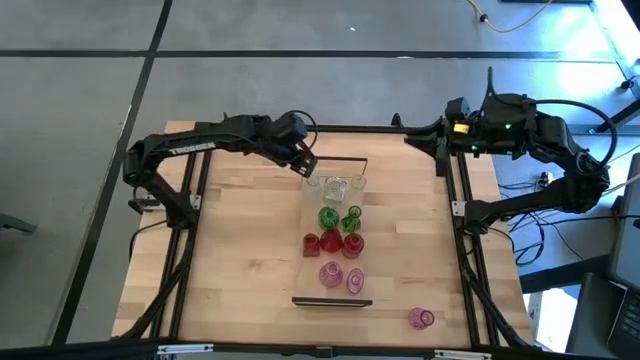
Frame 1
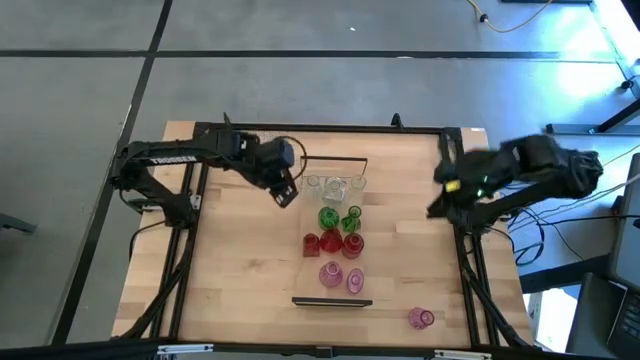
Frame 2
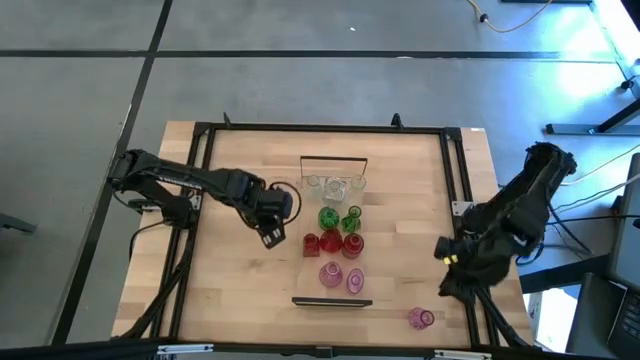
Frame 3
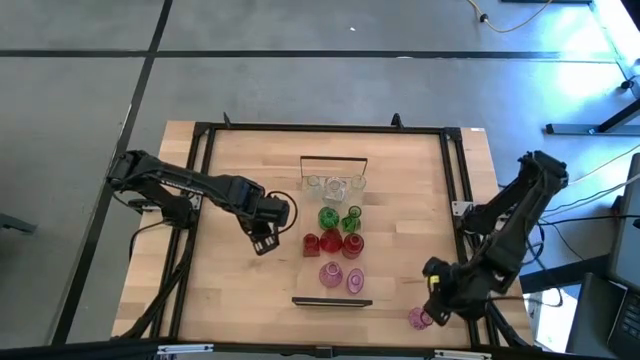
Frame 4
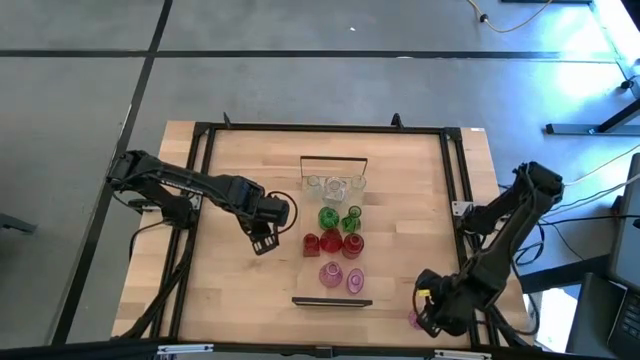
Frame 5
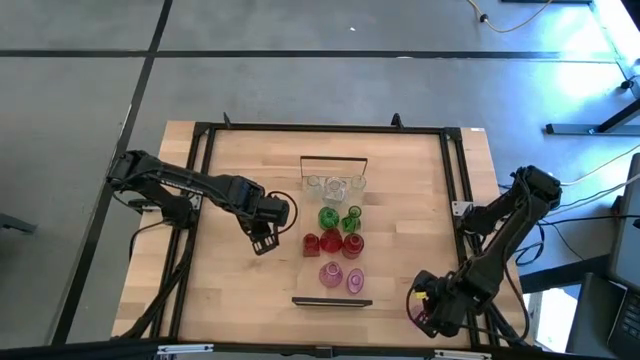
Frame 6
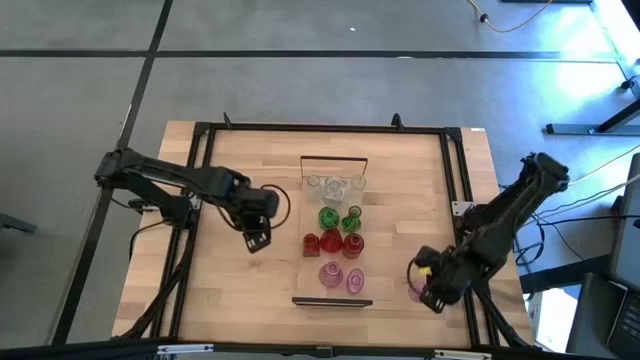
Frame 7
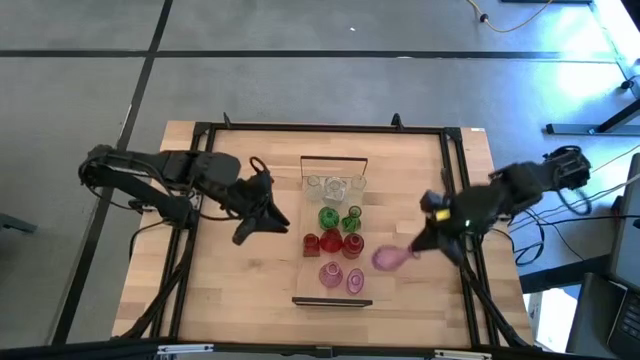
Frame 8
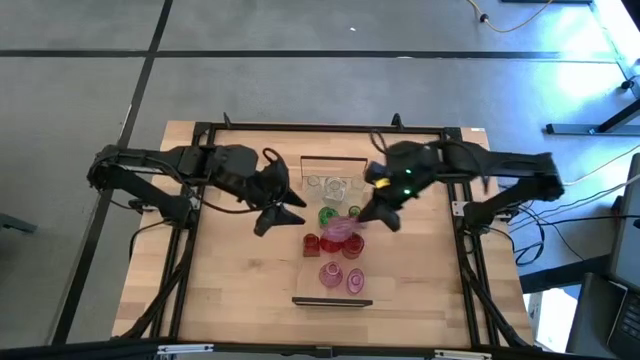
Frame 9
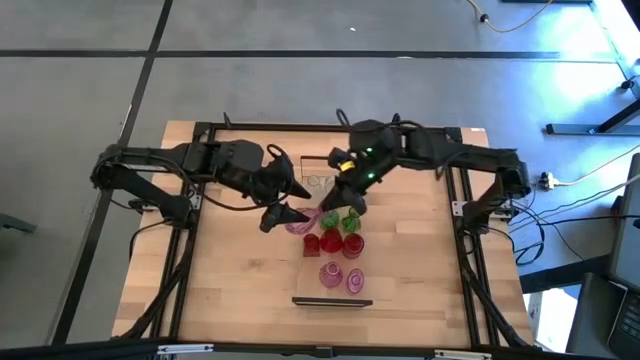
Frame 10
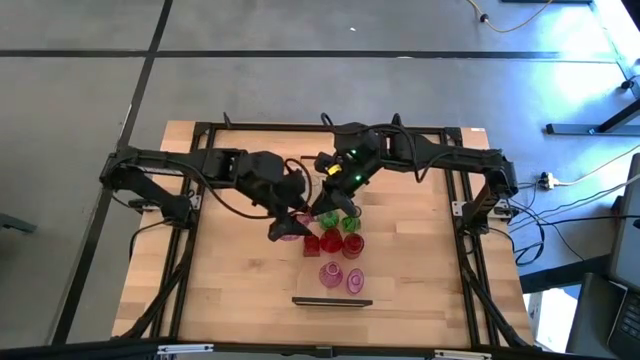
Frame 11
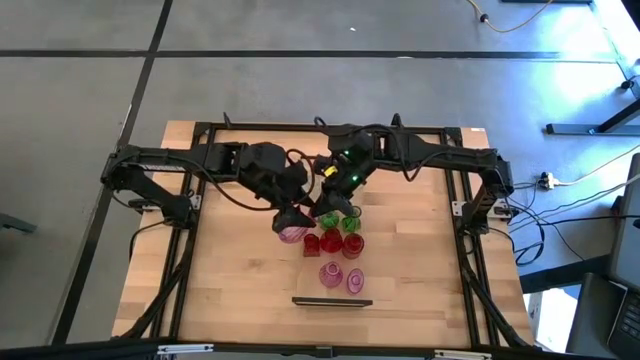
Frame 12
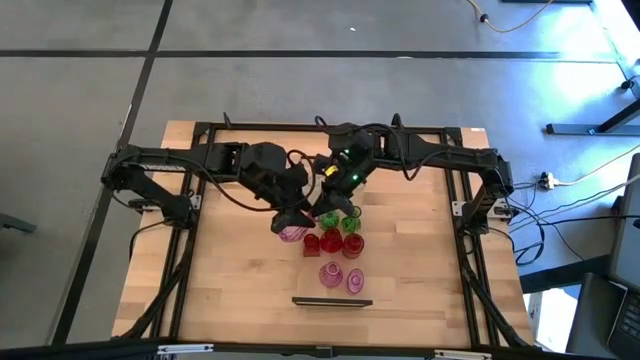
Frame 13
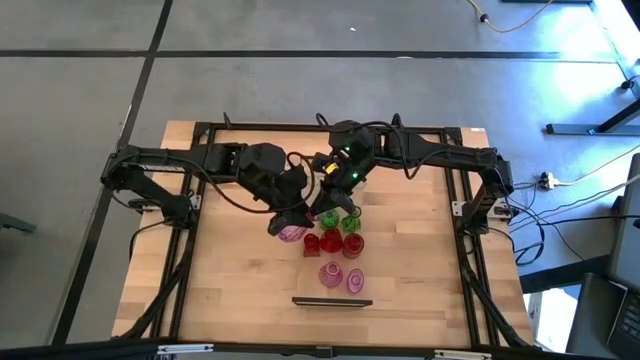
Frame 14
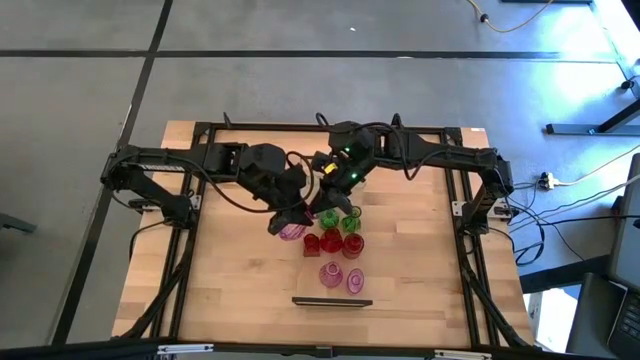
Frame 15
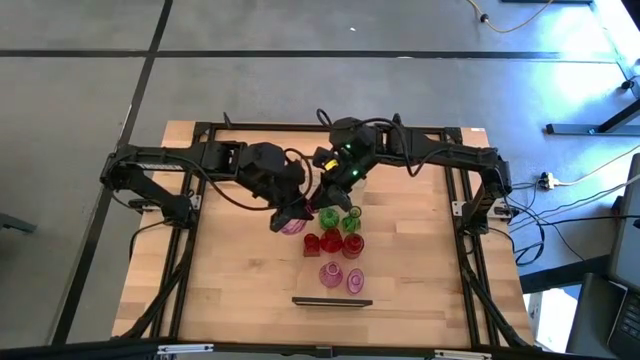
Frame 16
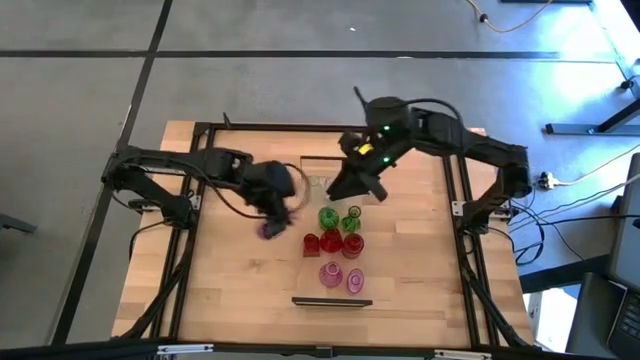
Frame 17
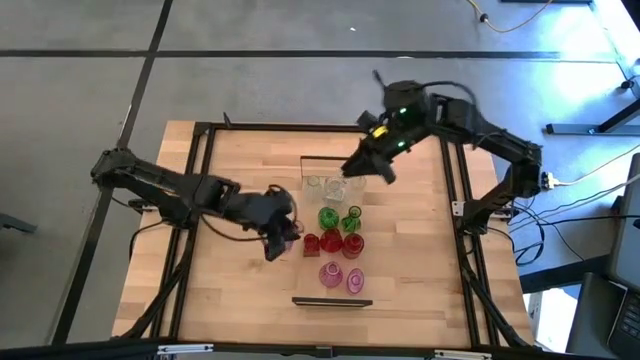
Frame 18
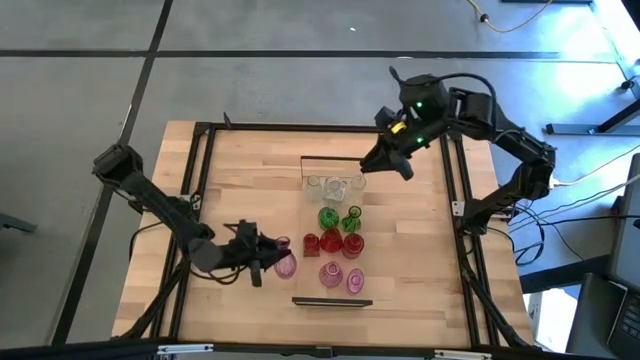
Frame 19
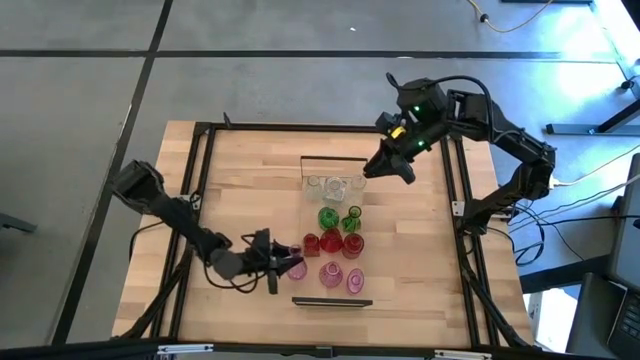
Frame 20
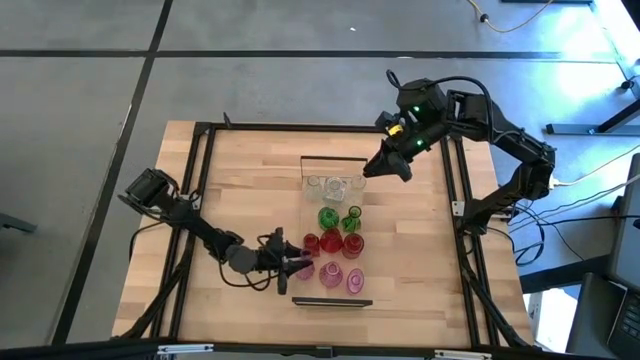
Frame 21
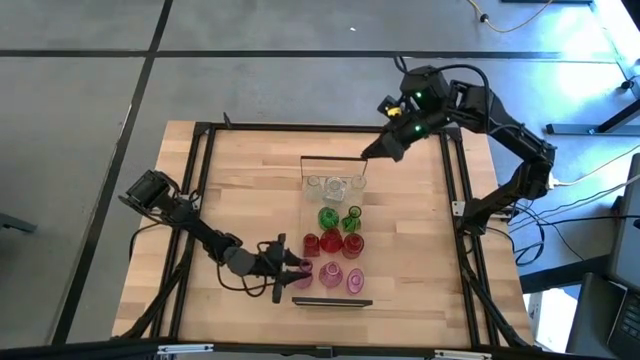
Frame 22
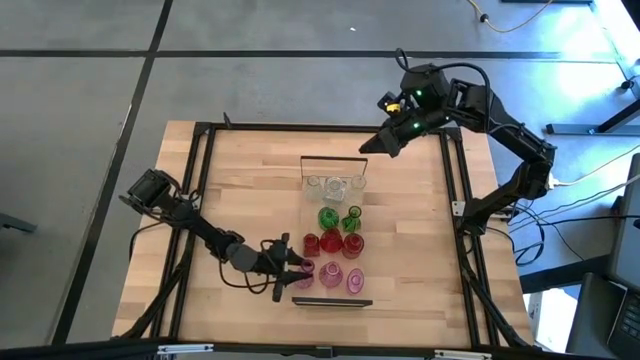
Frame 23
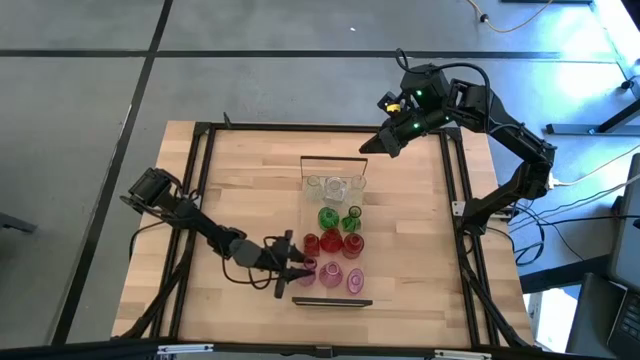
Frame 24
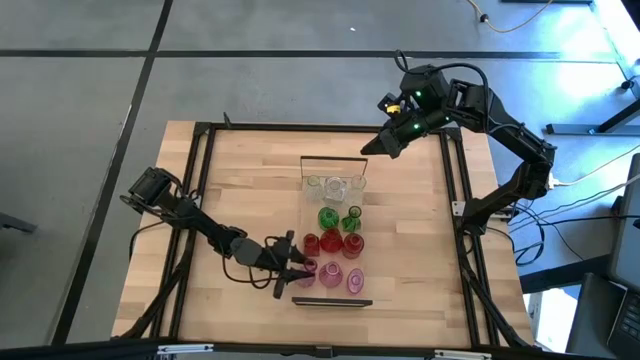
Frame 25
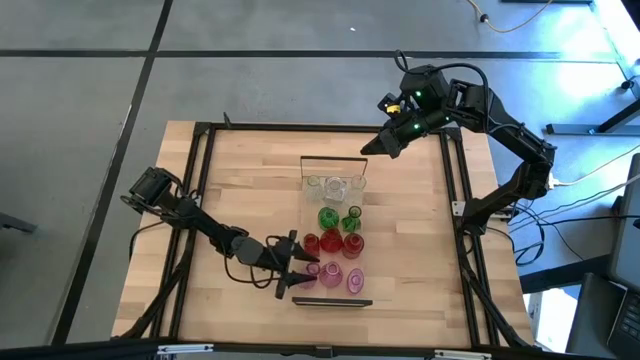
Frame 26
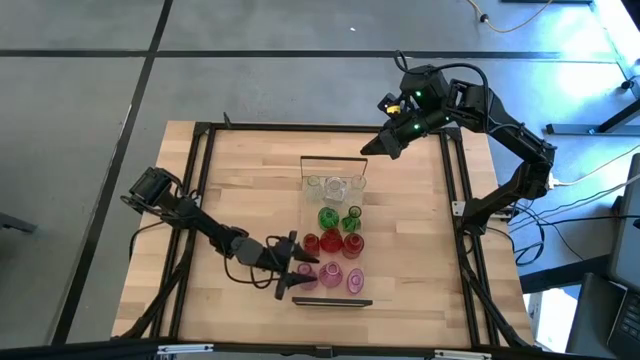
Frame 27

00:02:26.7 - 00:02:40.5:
Task: sort vases onto shelf
Put the pink vase aligned with the other pink vases on the shelf

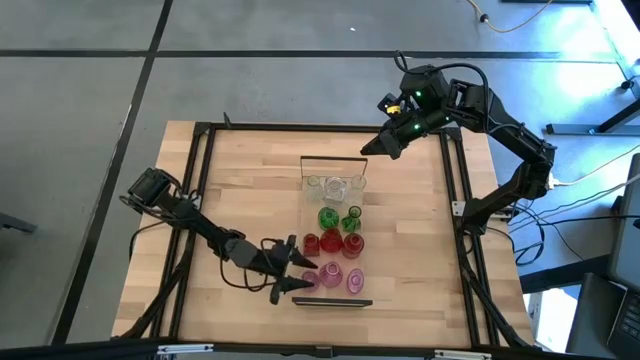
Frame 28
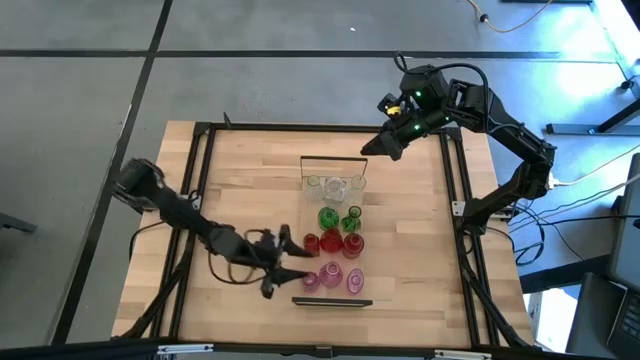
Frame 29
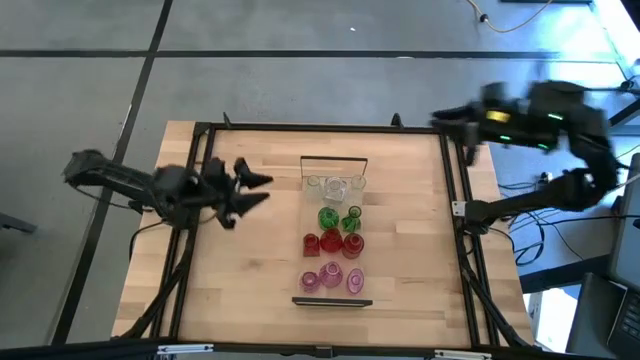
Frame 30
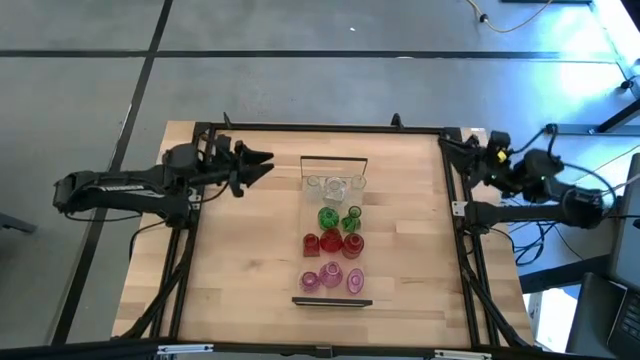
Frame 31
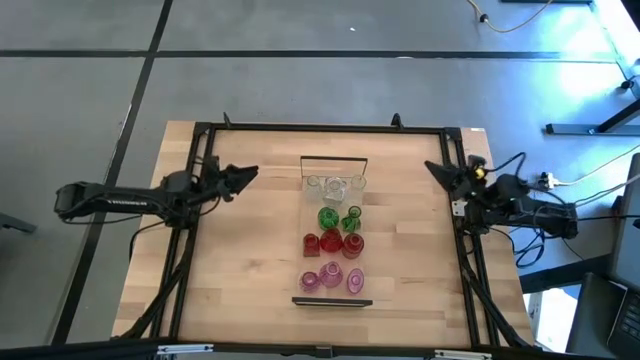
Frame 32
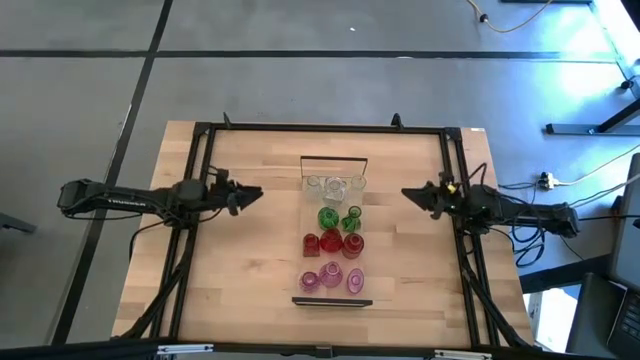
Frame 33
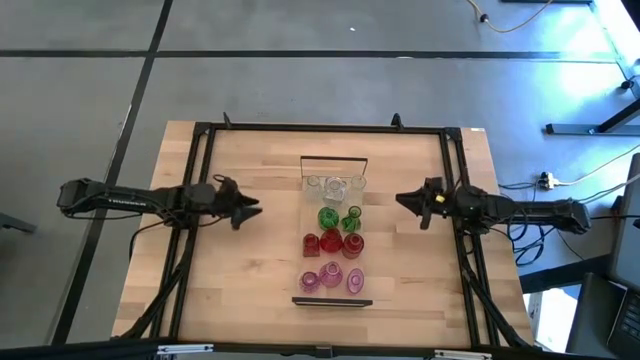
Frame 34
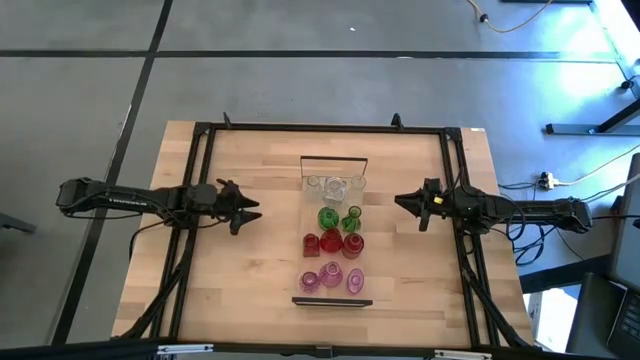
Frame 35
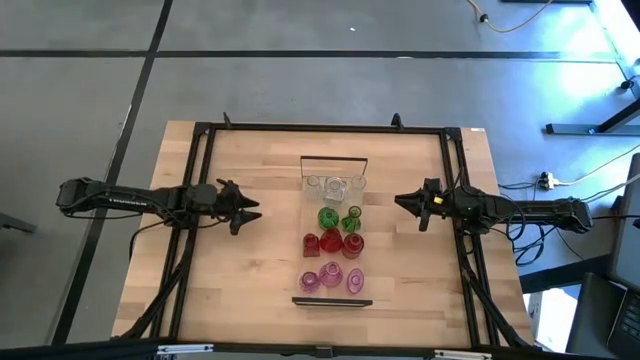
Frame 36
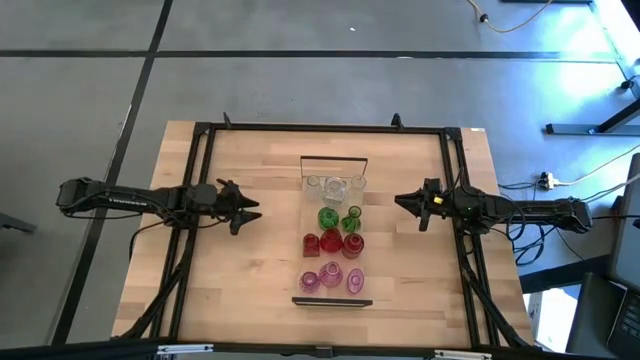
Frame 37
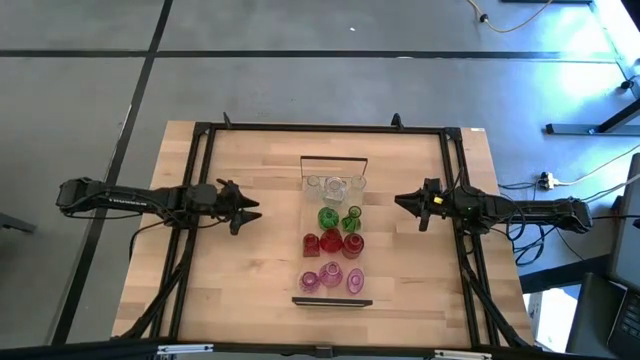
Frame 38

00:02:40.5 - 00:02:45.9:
Return to Home Position

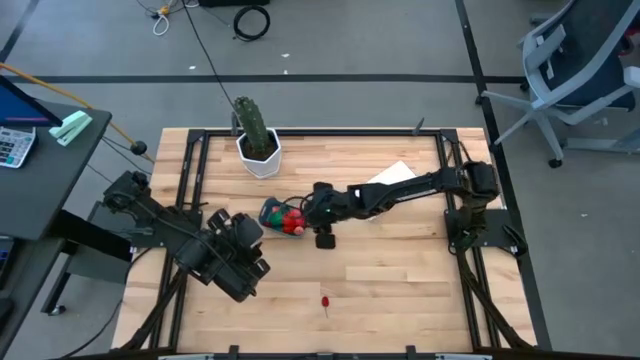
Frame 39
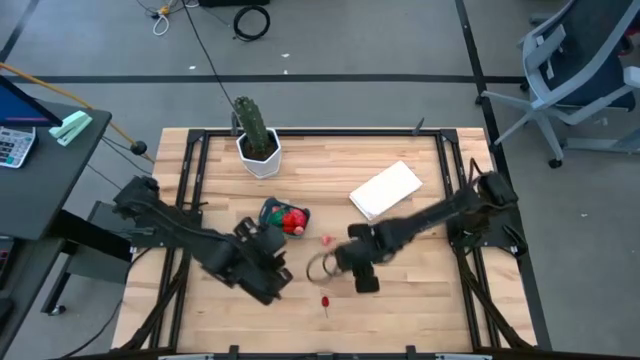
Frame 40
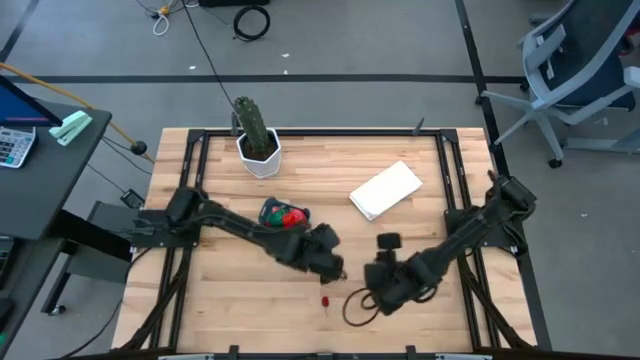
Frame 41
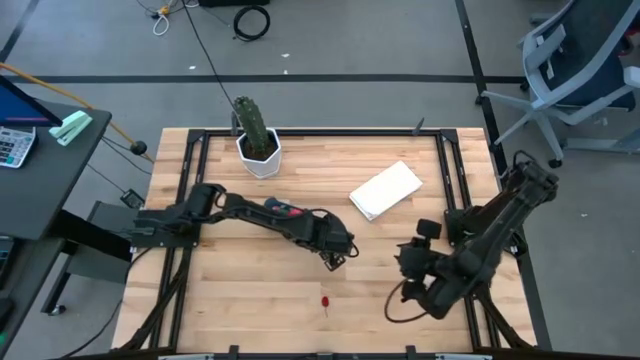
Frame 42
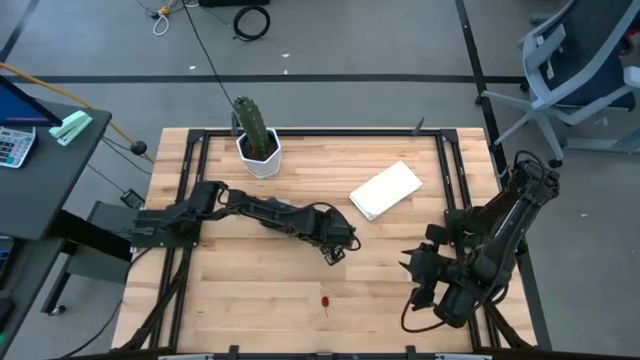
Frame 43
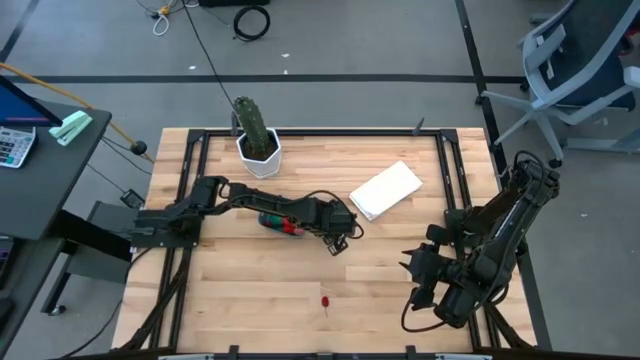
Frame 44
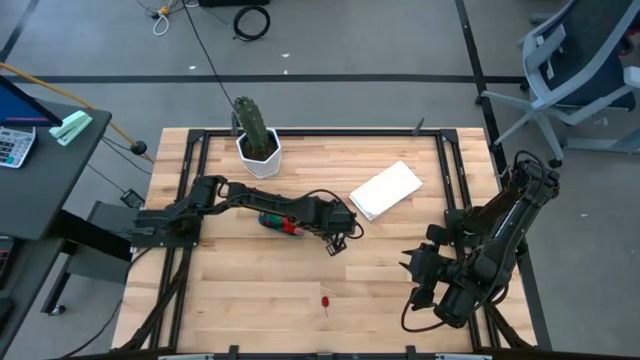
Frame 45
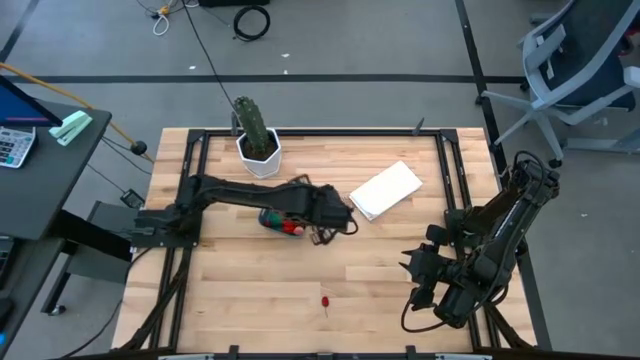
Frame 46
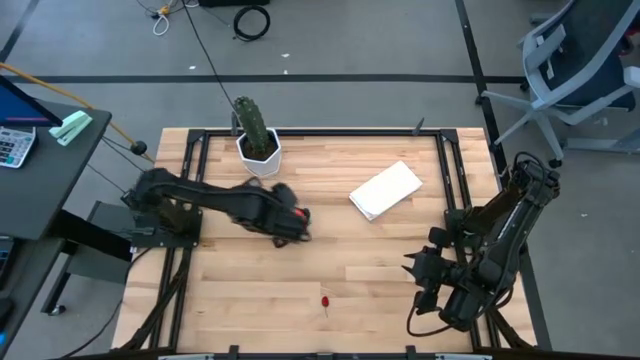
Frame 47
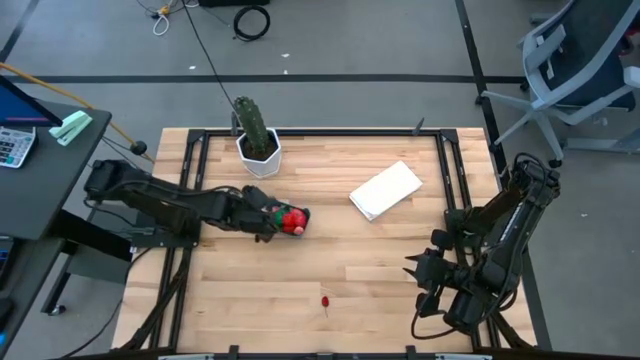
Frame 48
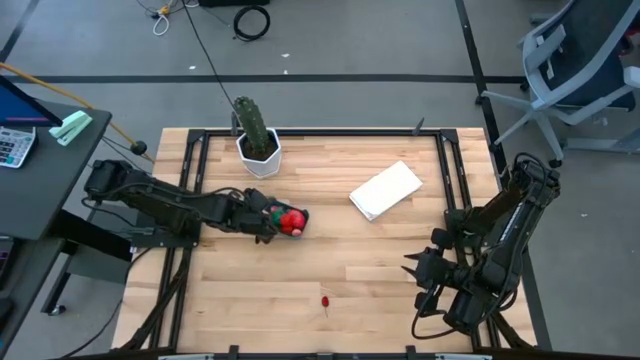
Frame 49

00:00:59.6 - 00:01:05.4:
Task: Pick and placing Produce into tupperware
Put the pink peach into the blue bin
